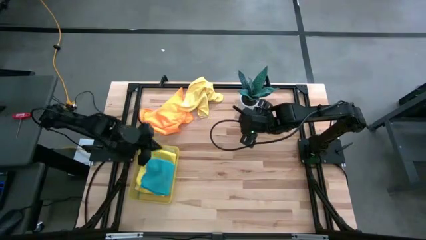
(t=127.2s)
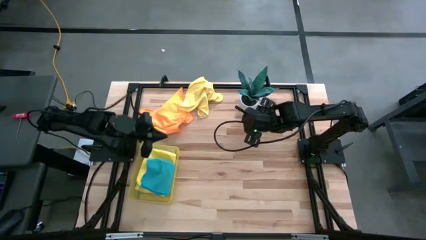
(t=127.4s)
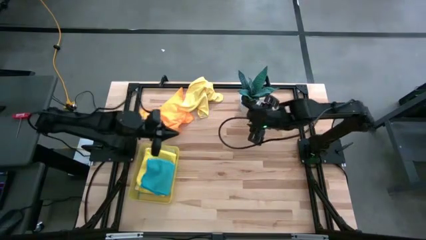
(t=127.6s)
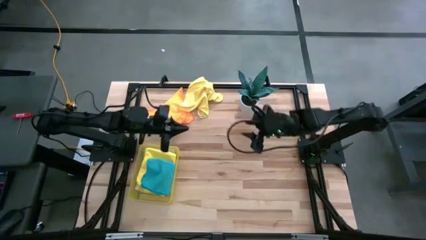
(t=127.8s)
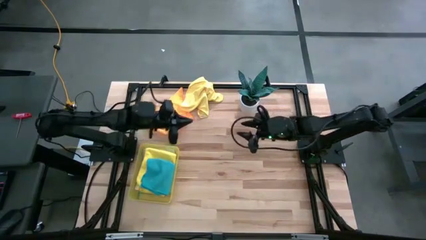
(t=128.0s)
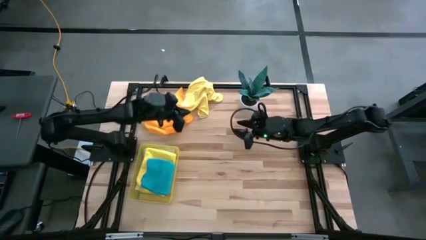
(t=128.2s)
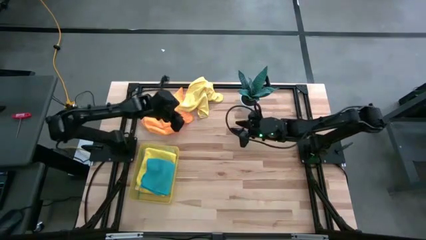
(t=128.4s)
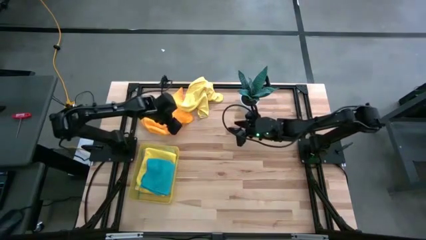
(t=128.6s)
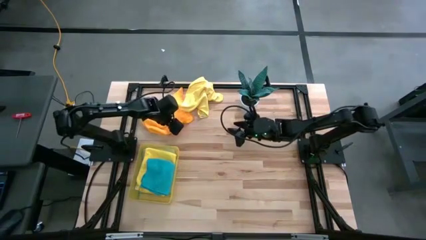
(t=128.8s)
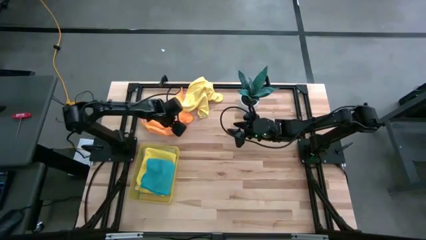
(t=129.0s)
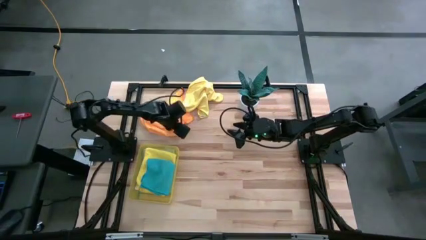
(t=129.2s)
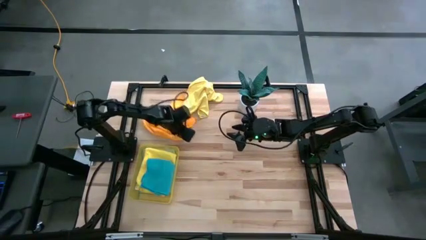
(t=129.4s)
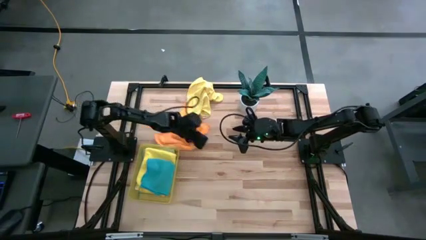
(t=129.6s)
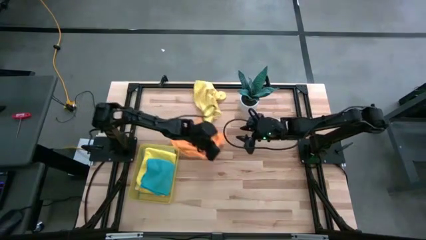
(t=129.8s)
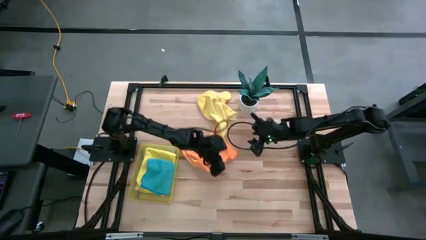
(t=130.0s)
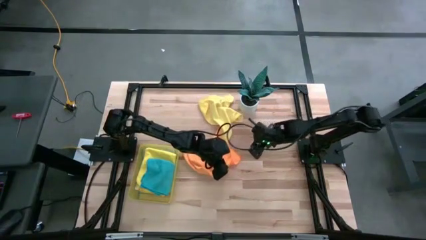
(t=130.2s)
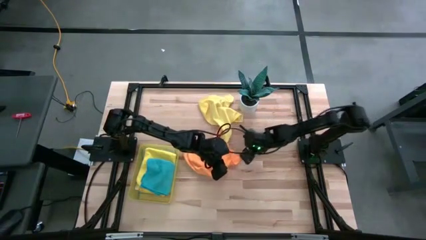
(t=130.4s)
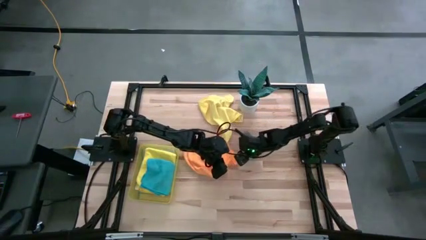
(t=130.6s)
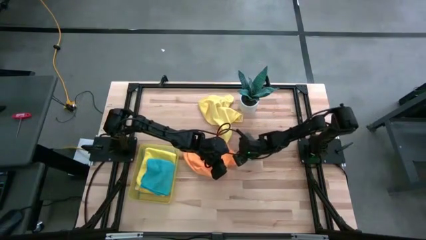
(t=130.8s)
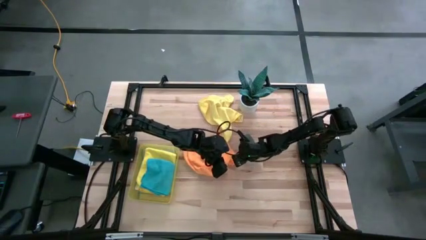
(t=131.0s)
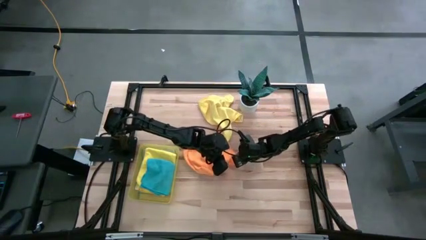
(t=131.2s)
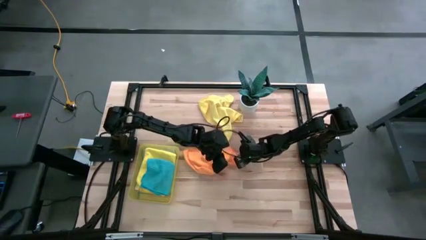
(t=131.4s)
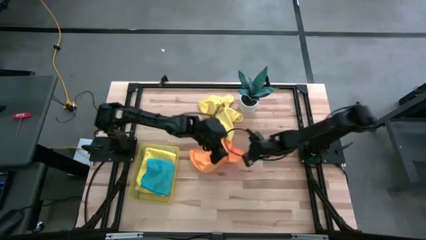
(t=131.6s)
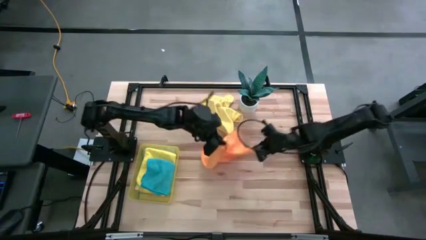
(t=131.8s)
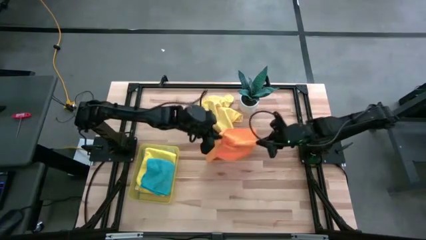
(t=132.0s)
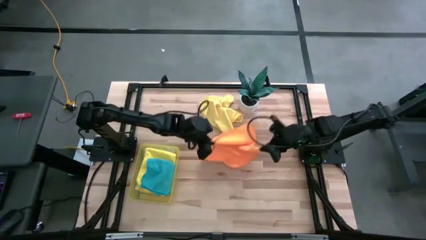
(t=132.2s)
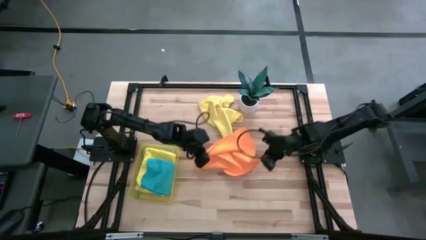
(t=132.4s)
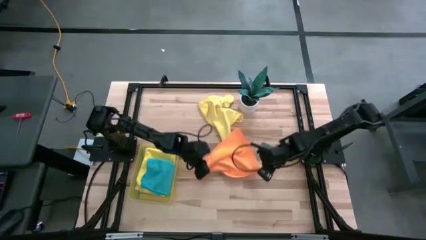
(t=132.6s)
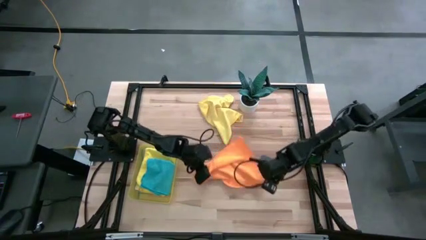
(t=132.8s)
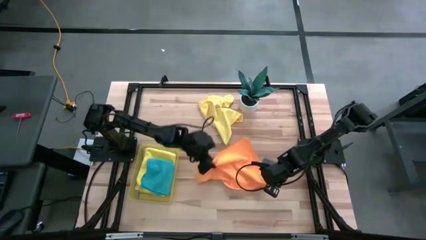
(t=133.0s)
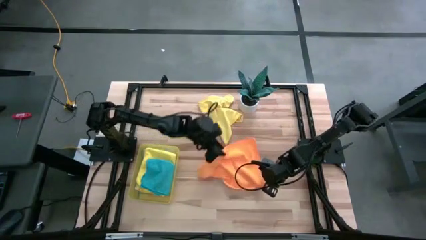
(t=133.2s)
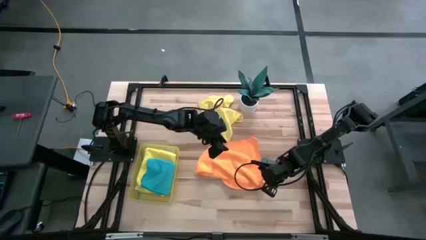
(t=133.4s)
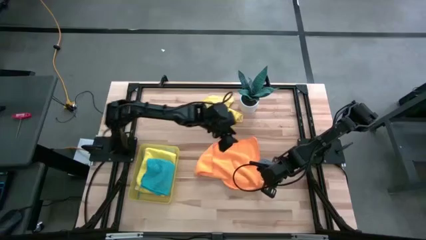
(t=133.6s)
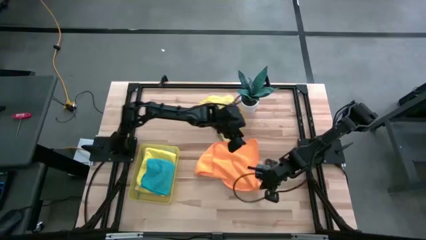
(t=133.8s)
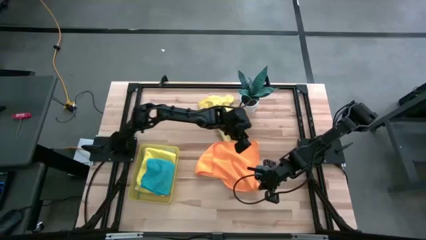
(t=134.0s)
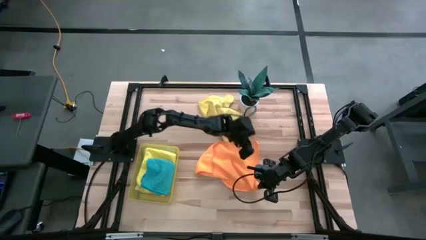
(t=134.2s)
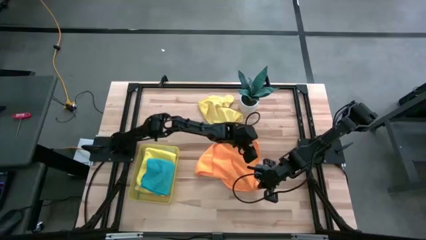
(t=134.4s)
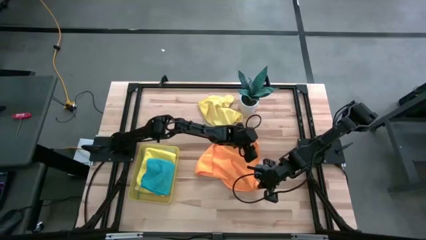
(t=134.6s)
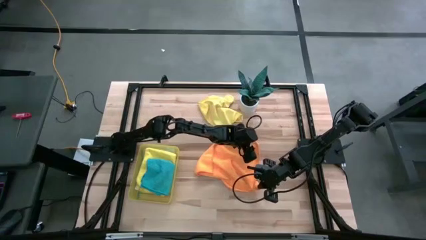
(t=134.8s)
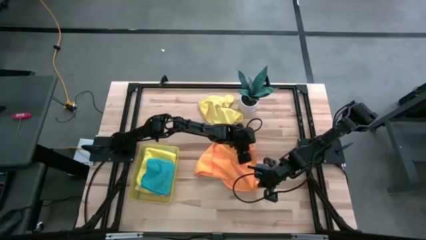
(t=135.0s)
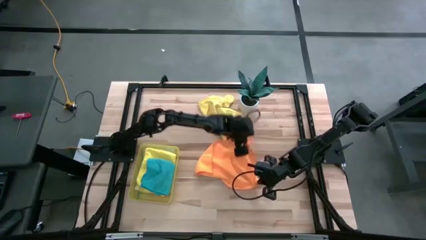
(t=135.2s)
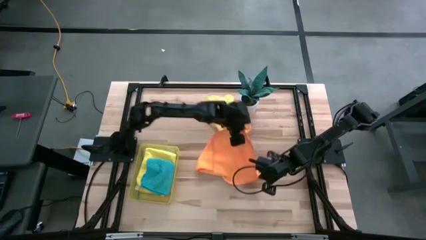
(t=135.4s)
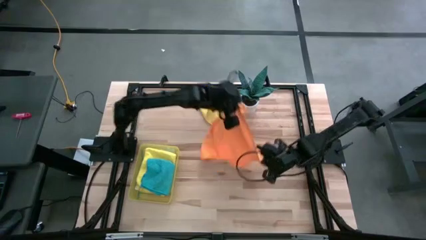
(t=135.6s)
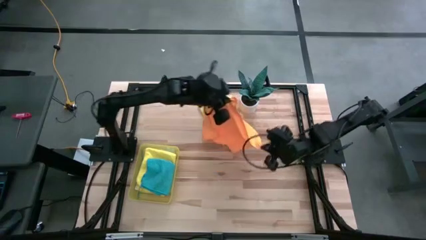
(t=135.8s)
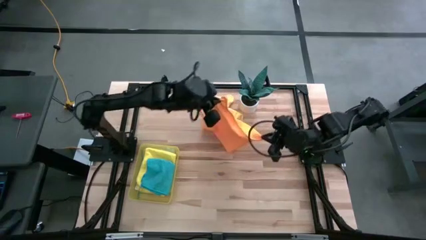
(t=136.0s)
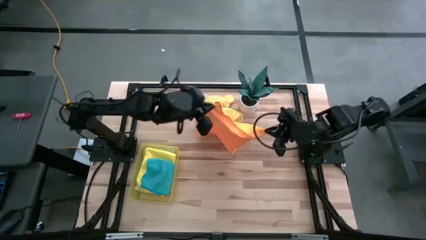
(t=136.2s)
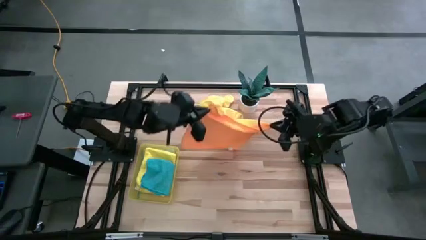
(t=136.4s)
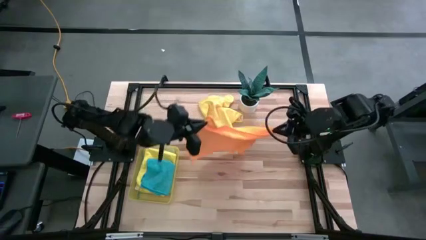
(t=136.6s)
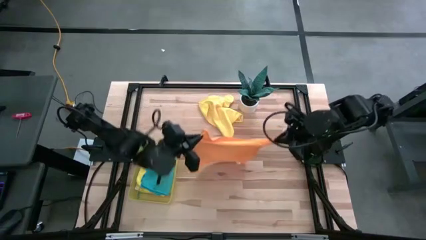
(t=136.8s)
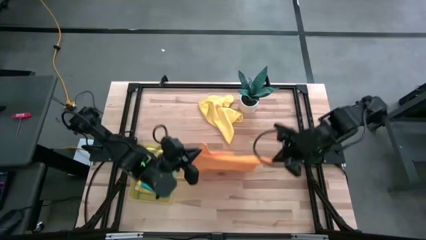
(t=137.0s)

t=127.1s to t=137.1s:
Task: Fold microfiber towels
Move the orange microfiber cloth to the bottom center of the table

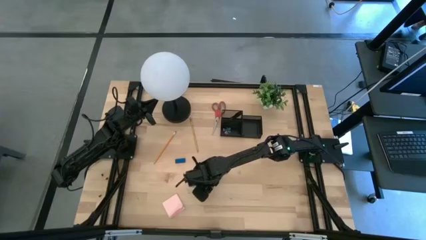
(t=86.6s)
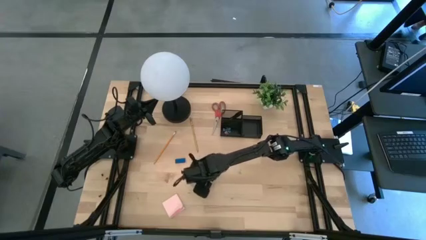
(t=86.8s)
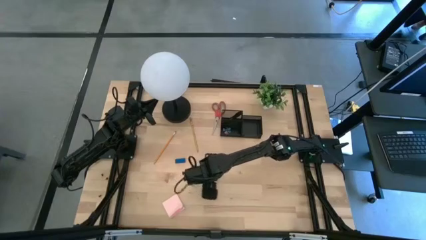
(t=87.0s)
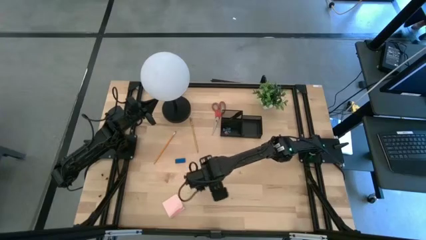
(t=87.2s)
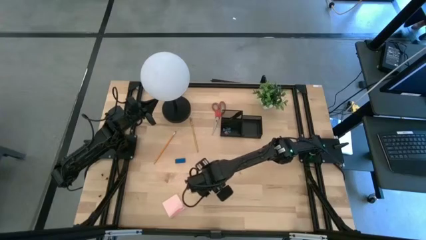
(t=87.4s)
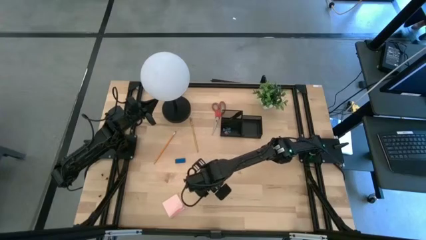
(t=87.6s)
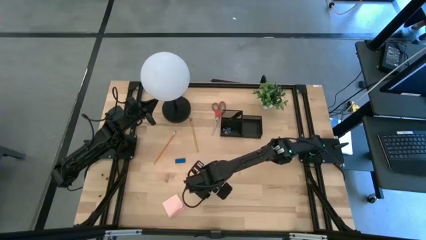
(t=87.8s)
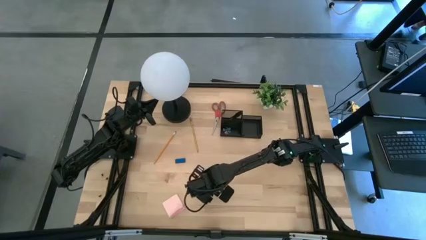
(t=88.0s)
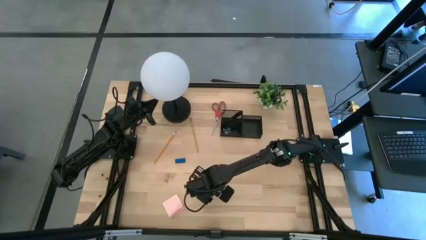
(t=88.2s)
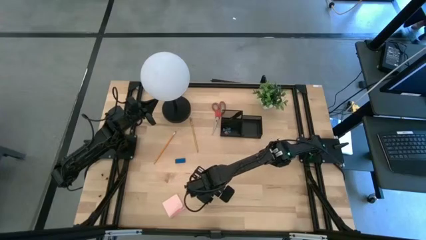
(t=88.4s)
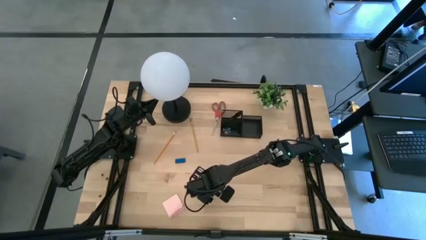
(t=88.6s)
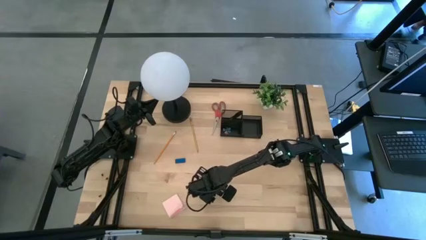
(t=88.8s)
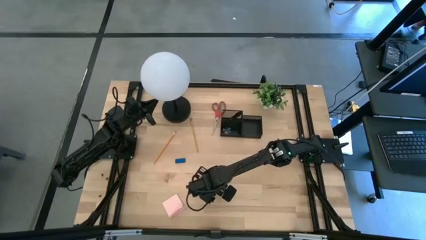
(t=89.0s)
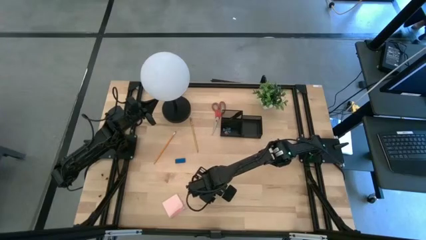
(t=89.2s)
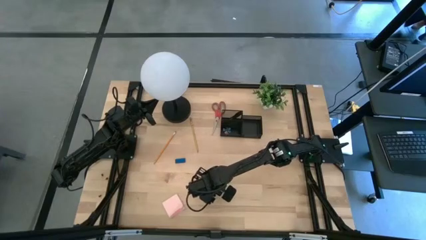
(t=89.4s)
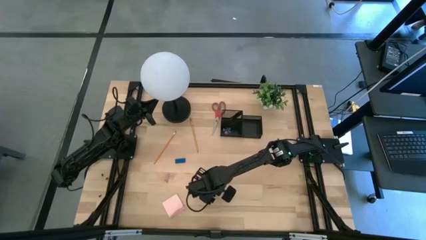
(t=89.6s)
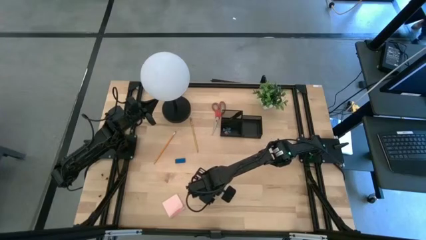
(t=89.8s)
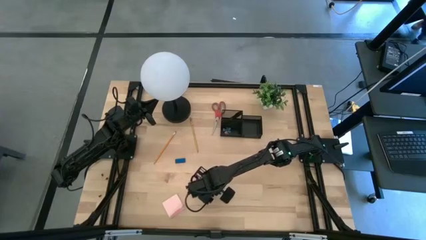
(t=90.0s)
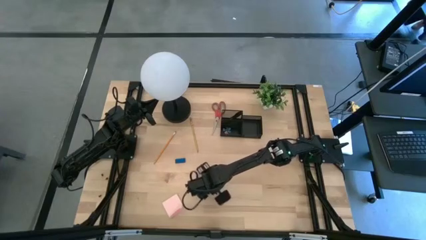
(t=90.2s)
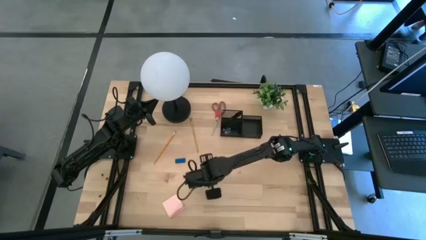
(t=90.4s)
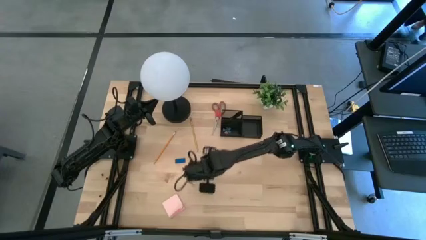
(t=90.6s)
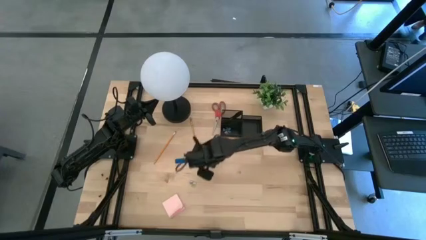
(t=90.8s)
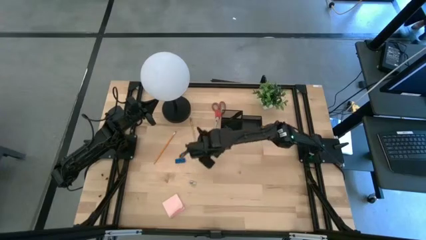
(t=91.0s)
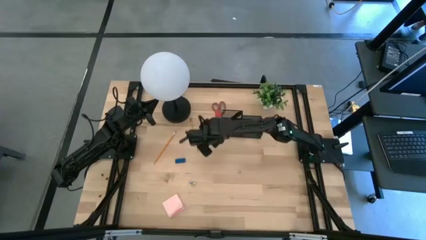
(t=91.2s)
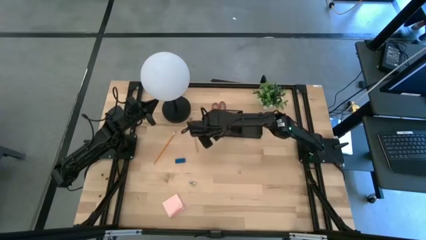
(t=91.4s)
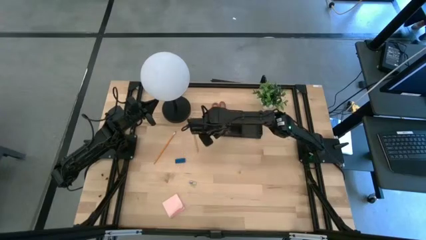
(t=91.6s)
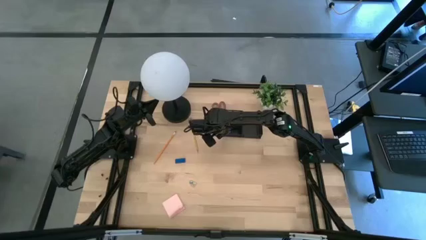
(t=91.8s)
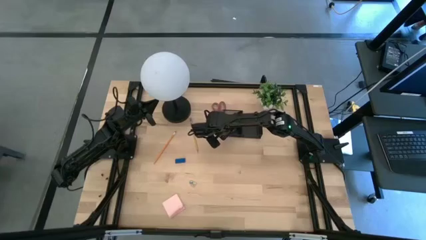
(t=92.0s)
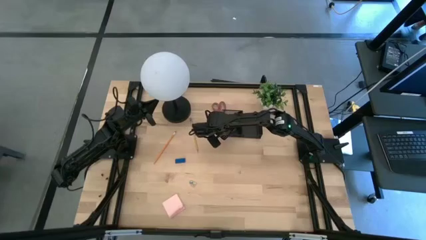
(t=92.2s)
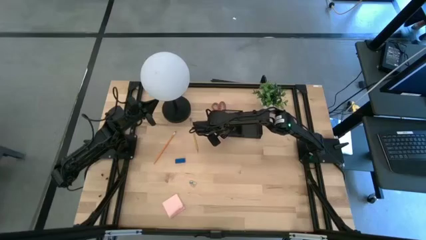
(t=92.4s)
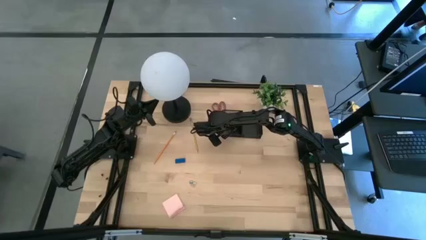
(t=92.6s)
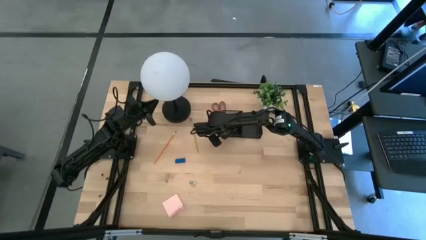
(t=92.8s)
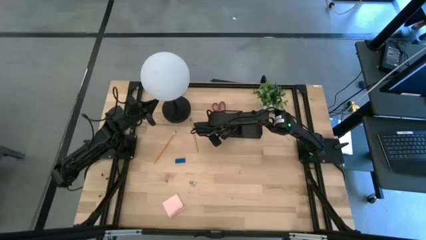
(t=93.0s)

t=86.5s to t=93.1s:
Task: Pick and place office supplies into organizer
Put the right pink clip binder into the black desk organizer
